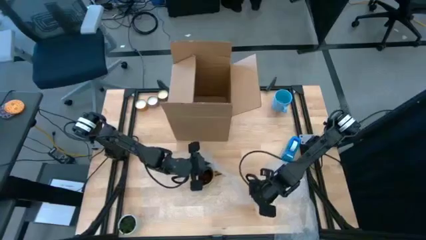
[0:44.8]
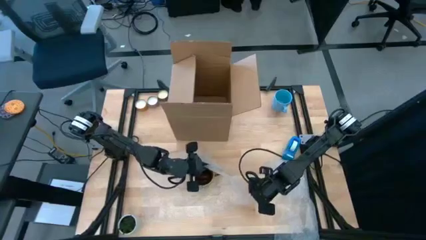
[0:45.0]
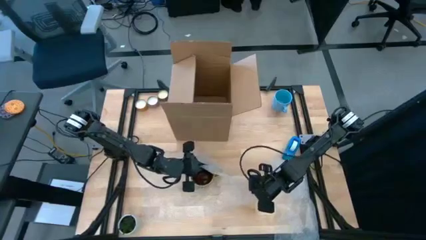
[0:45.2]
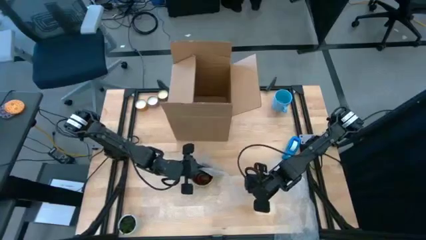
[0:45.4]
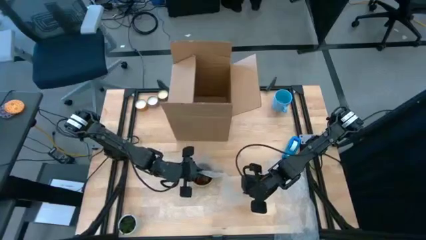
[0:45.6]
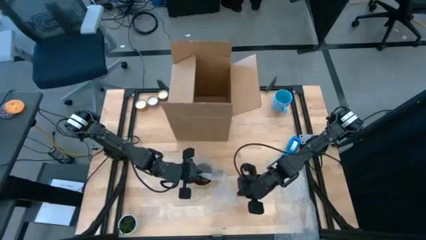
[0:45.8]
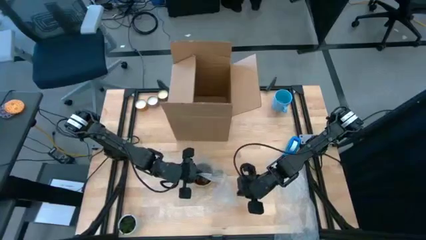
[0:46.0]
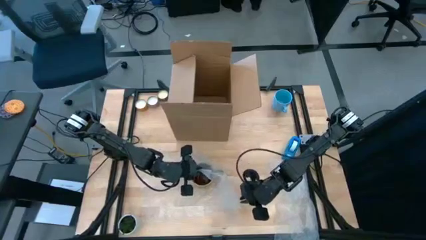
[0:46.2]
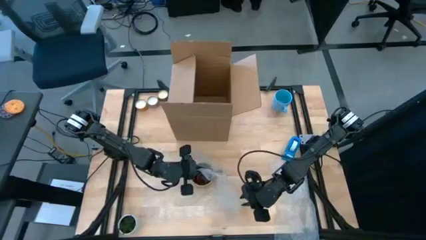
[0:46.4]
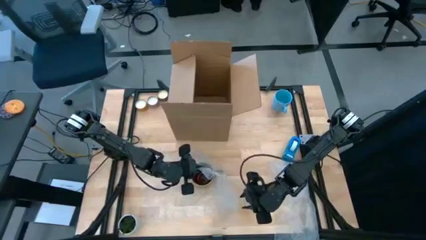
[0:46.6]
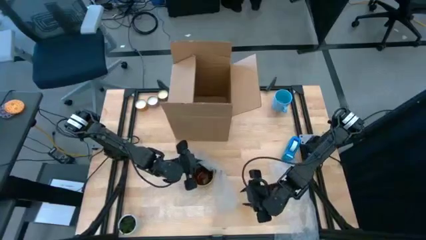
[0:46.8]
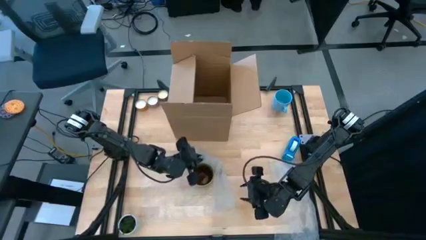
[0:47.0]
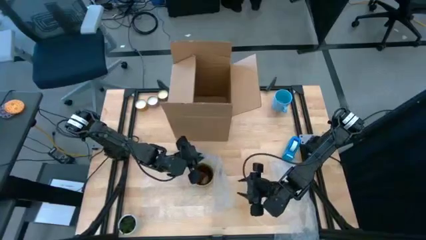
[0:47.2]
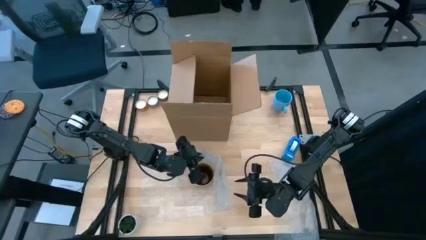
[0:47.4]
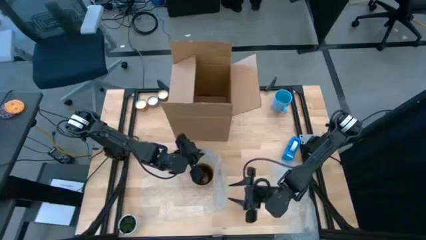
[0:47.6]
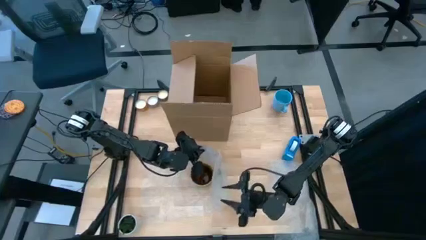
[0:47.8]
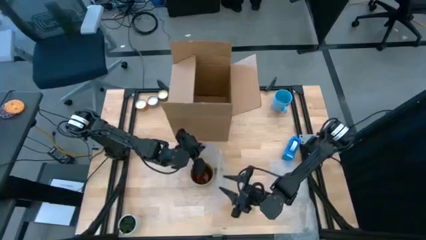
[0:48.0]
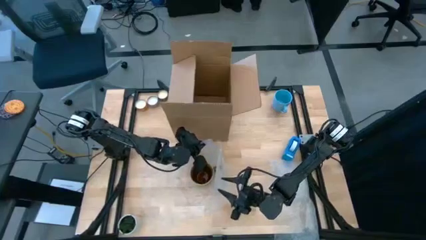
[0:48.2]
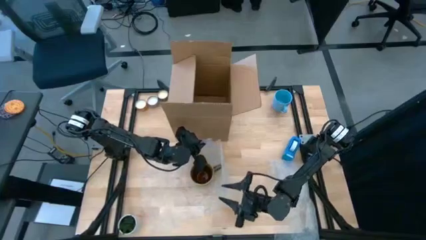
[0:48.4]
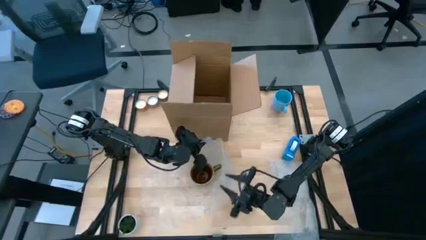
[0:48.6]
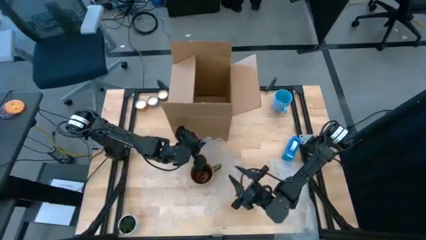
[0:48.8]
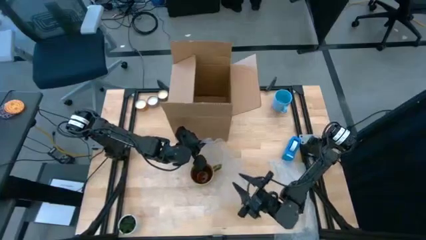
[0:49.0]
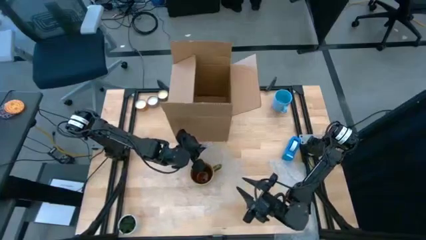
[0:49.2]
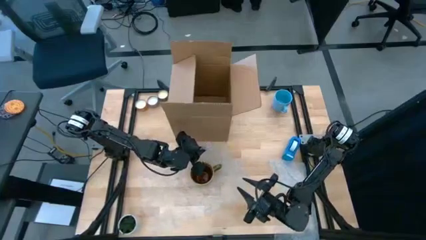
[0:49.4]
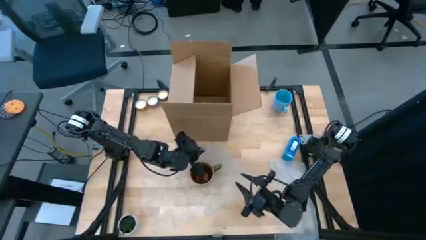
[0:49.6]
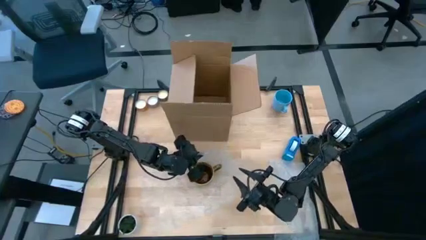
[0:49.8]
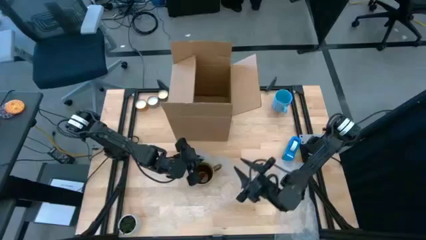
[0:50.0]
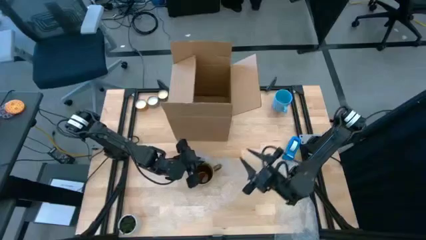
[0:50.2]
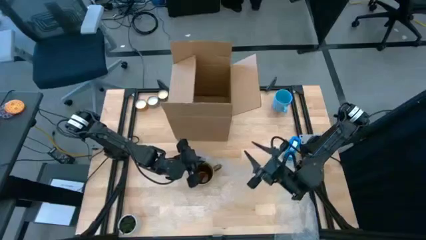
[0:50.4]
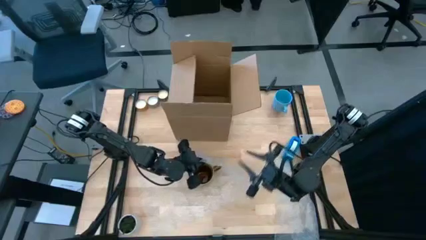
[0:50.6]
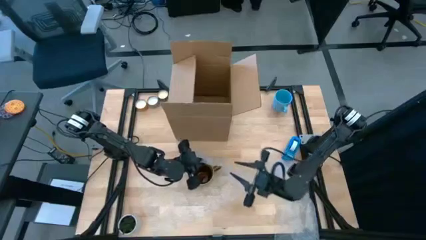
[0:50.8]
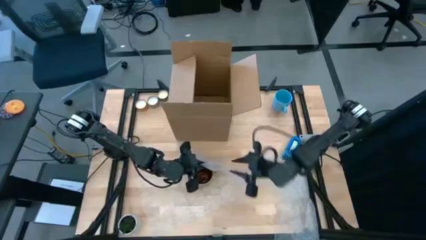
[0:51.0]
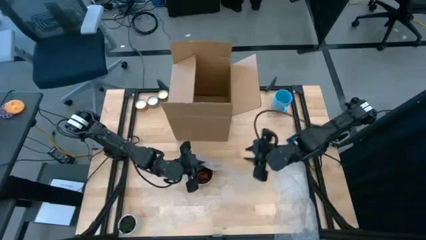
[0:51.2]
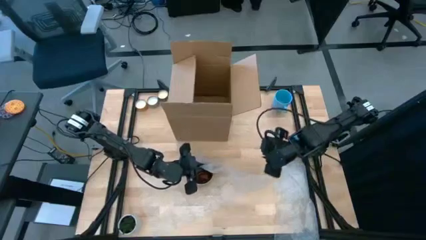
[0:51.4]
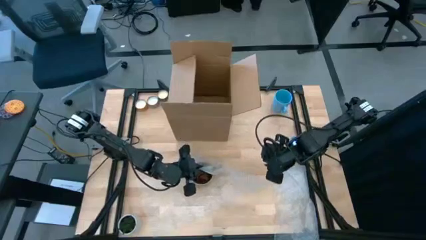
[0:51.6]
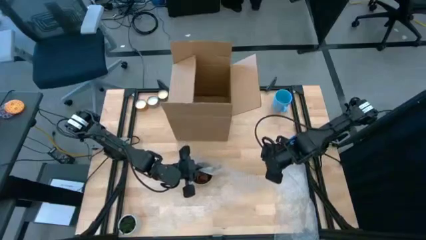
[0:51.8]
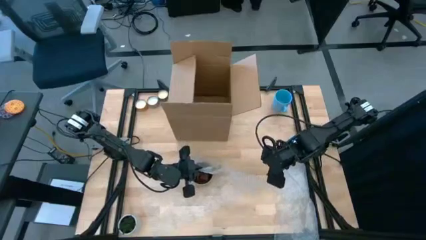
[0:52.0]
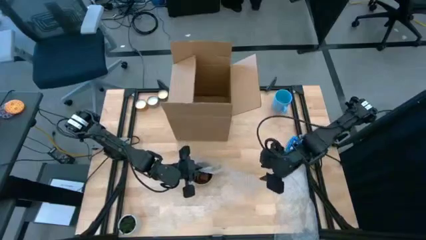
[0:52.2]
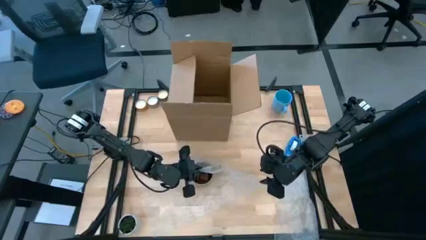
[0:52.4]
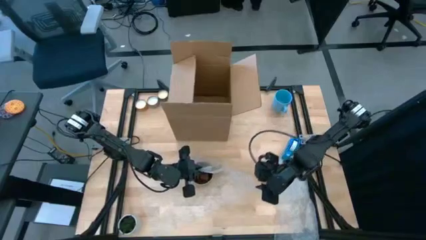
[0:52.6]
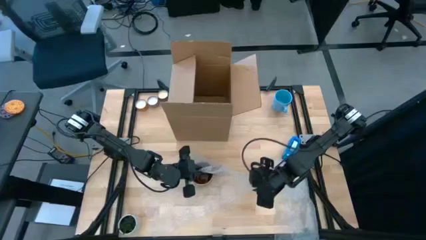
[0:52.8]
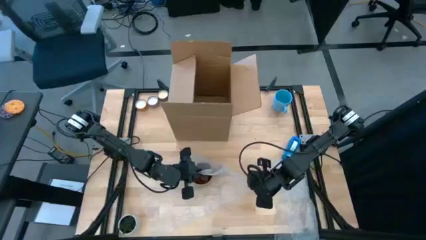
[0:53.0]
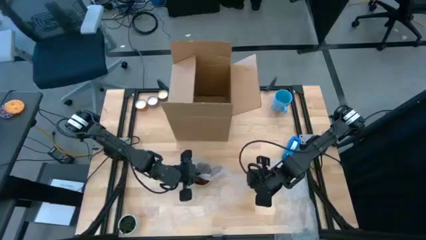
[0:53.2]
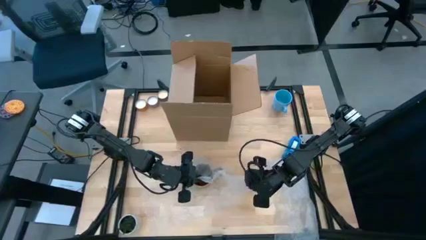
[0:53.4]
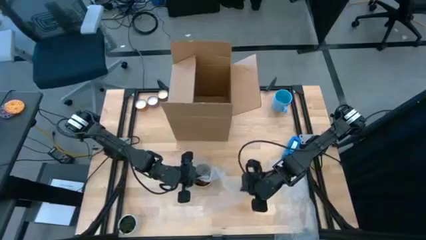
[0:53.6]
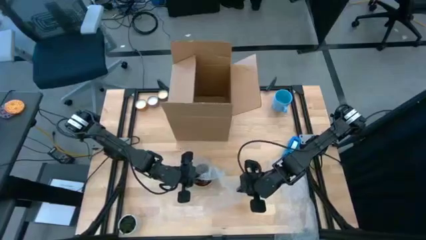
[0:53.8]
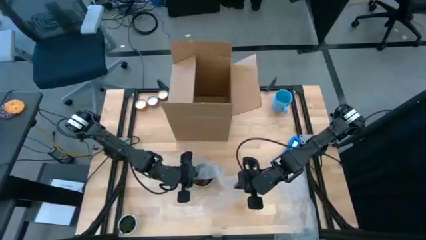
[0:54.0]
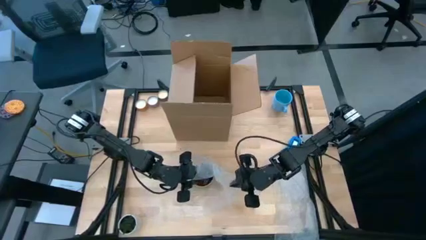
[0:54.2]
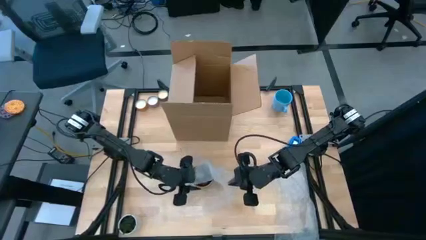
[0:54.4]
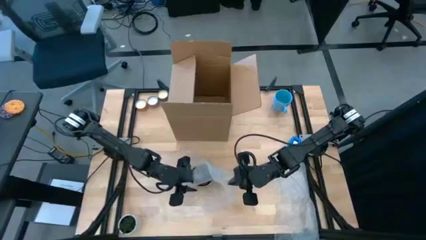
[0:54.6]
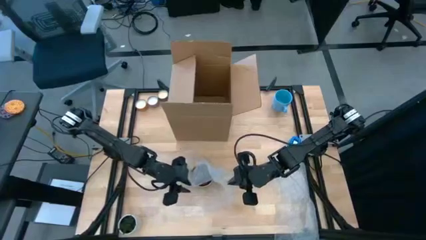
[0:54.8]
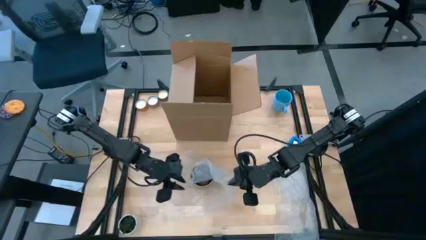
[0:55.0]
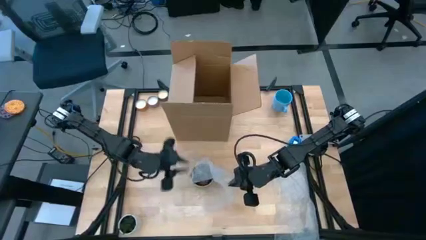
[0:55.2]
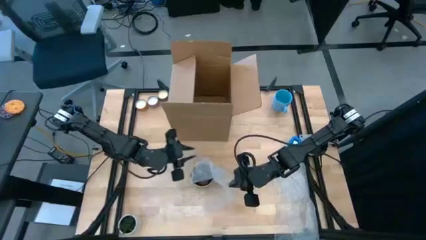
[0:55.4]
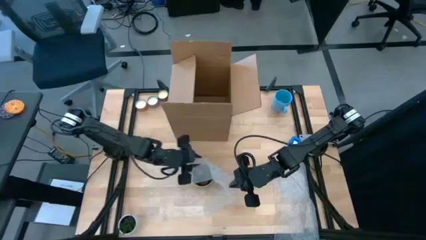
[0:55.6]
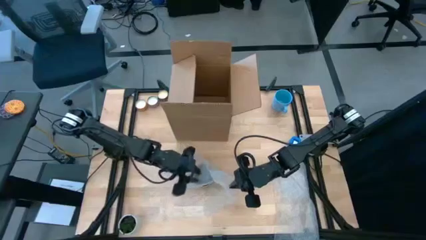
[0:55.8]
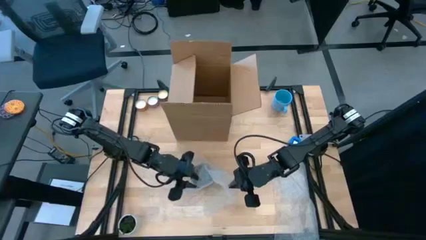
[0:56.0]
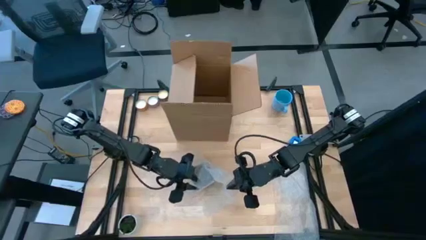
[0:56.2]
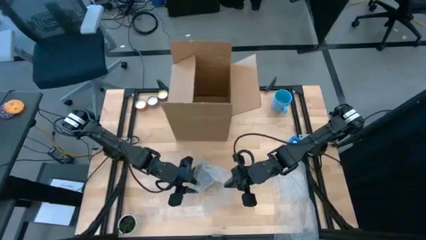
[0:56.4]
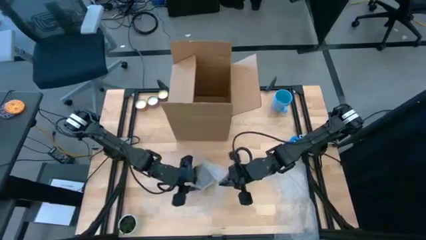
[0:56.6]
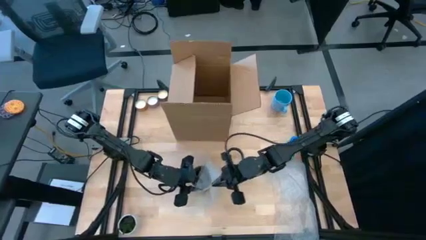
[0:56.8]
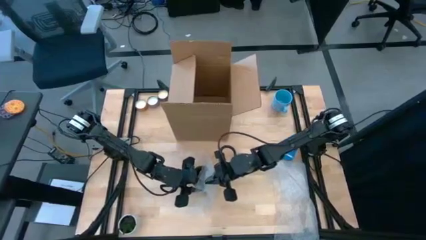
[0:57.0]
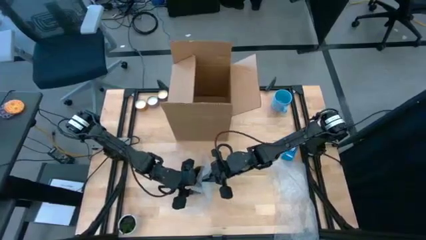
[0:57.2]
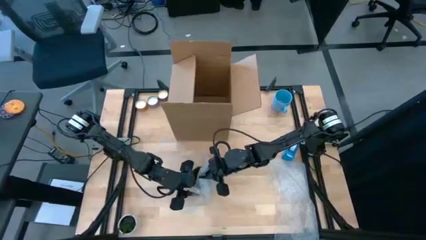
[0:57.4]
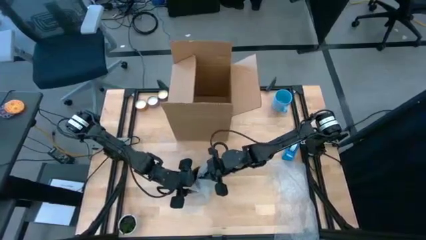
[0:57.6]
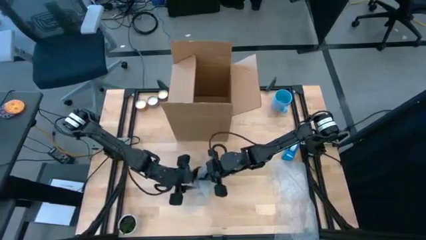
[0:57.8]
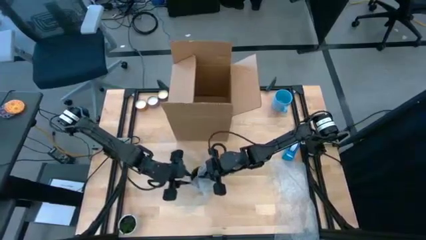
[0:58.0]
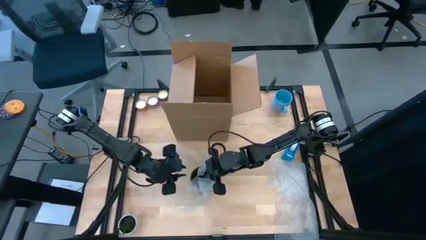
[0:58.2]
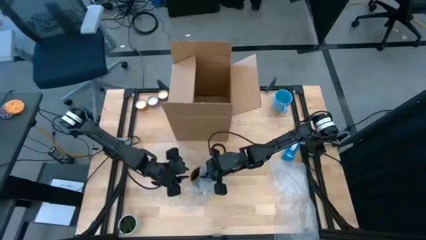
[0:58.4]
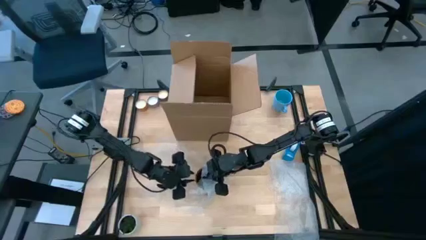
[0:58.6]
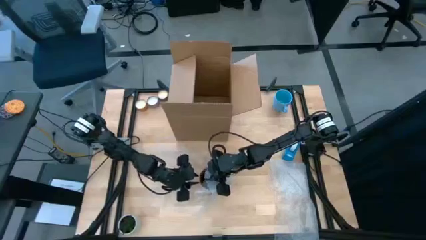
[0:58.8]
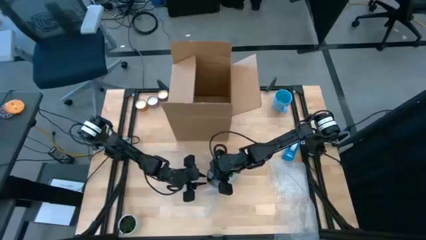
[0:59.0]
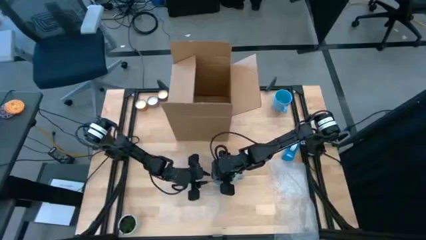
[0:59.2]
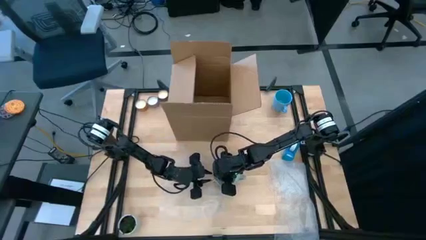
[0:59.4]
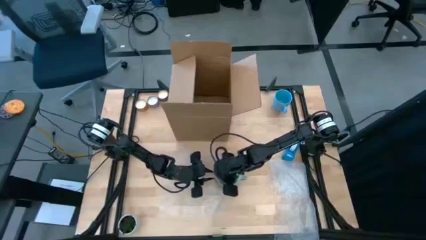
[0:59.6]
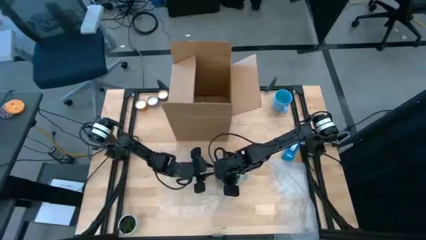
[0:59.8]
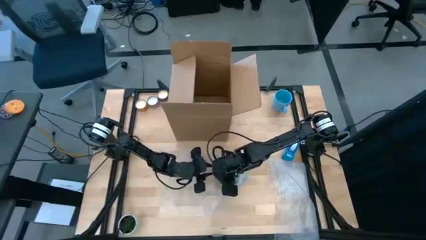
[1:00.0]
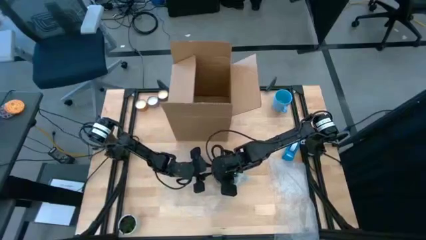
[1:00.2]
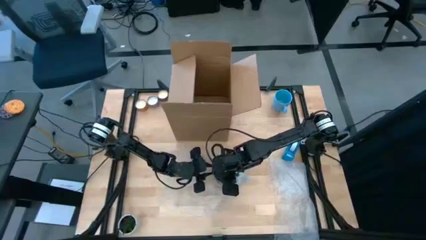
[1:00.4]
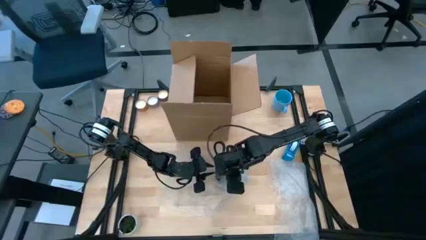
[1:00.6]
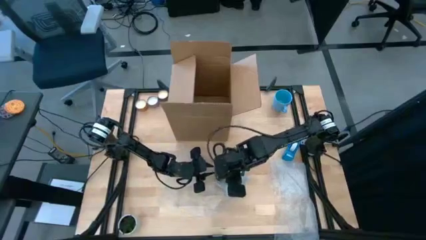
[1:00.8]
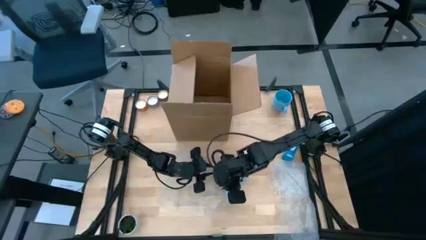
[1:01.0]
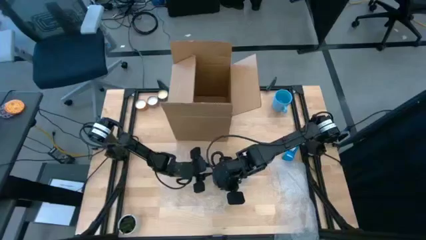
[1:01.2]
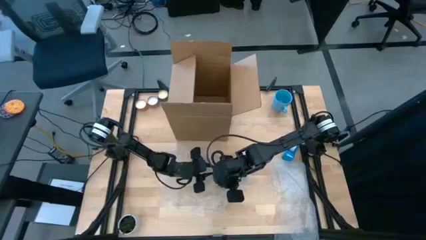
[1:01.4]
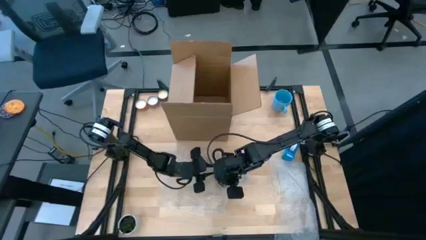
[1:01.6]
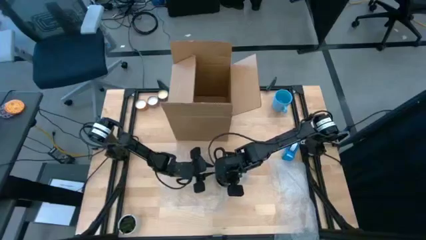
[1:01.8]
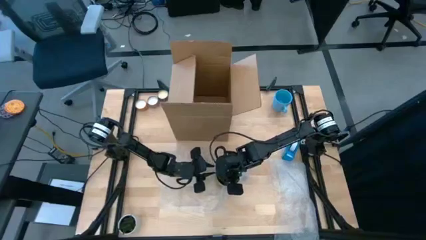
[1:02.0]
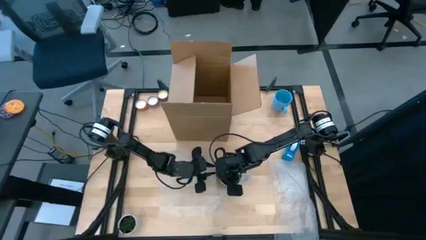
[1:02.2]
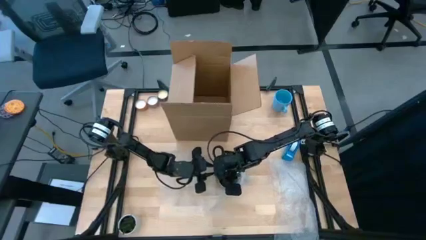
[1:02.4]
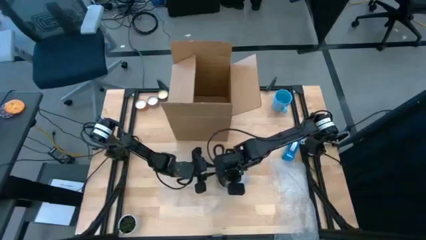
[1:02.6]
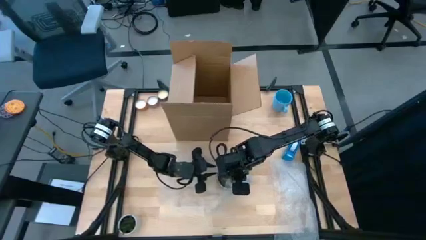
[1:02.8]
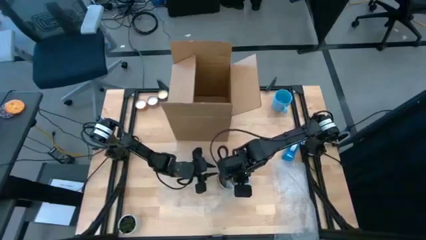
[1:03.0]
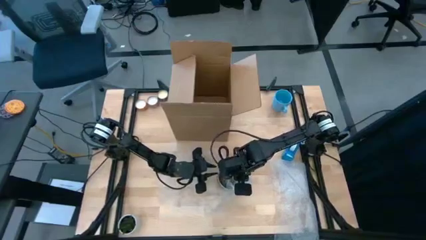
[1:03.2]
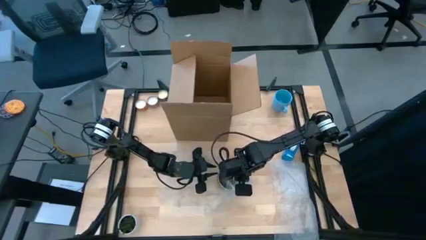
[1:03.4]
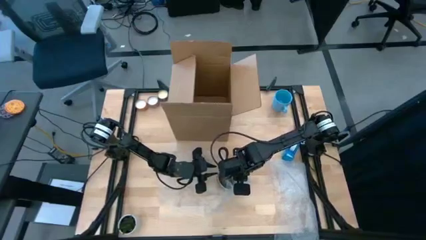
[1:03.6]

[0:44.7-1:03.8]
Task: wrap mug
Wrap the brown cup with bubble wrap
